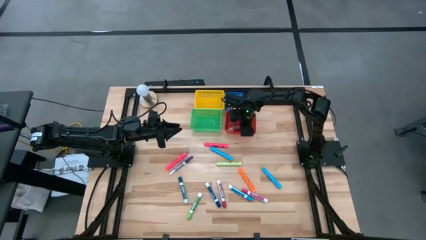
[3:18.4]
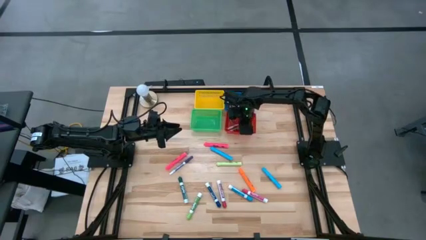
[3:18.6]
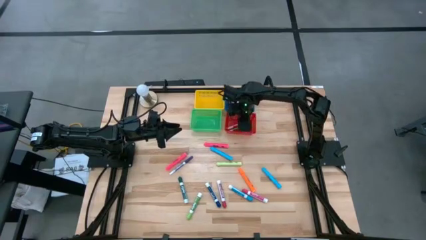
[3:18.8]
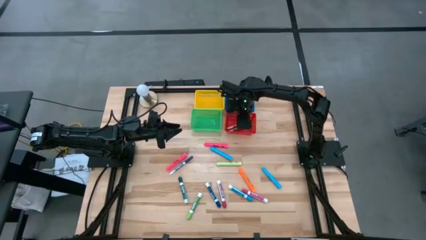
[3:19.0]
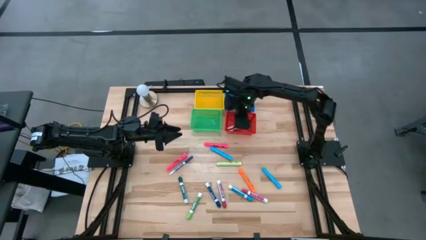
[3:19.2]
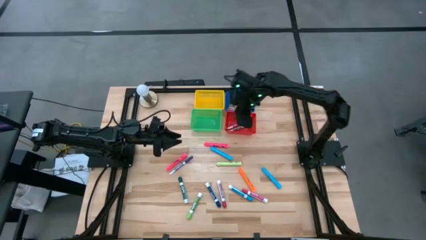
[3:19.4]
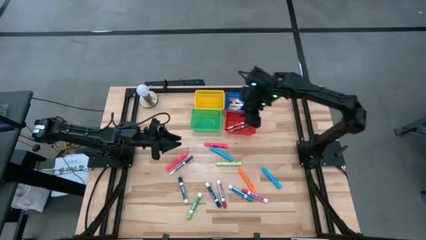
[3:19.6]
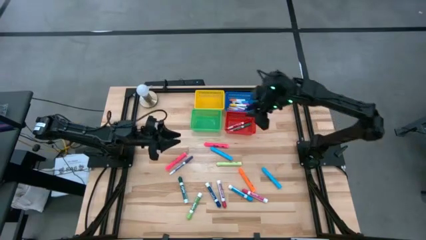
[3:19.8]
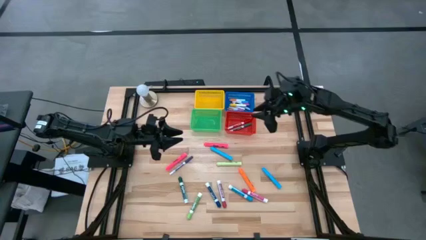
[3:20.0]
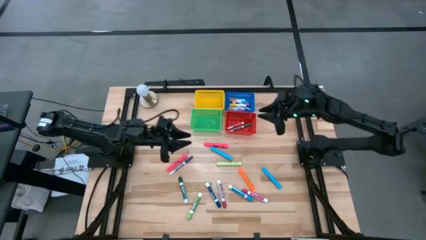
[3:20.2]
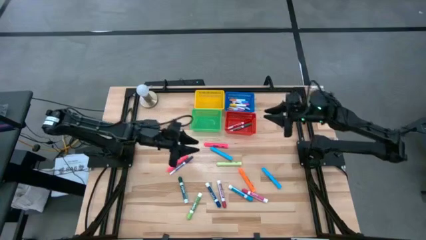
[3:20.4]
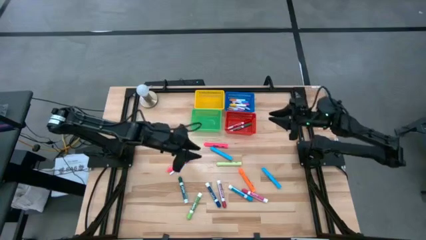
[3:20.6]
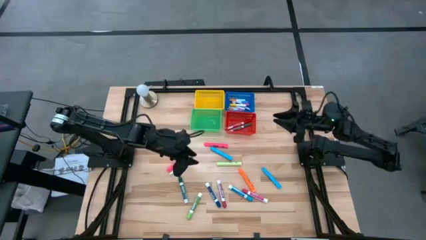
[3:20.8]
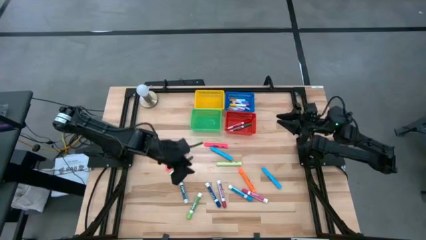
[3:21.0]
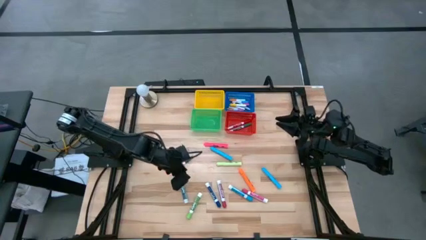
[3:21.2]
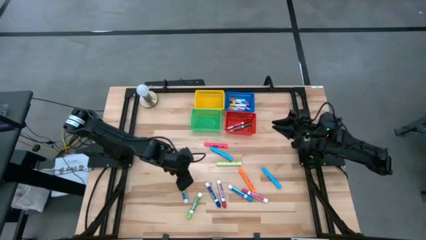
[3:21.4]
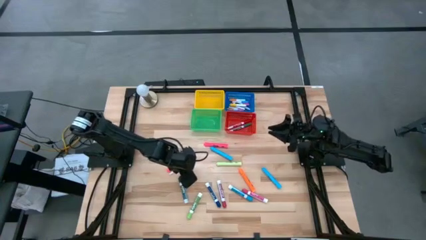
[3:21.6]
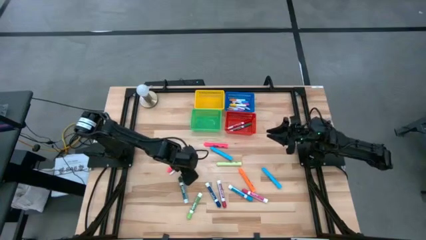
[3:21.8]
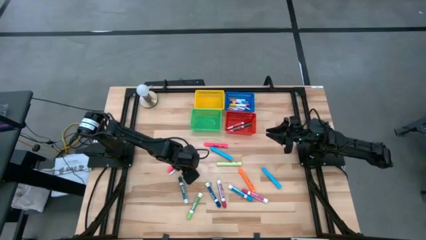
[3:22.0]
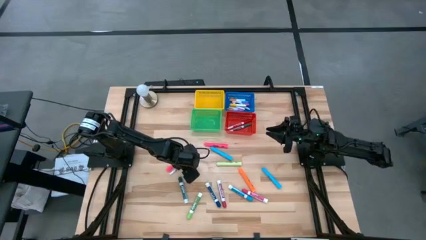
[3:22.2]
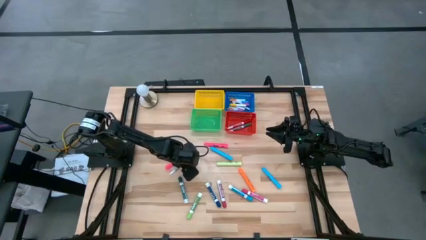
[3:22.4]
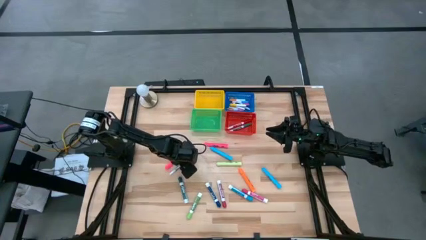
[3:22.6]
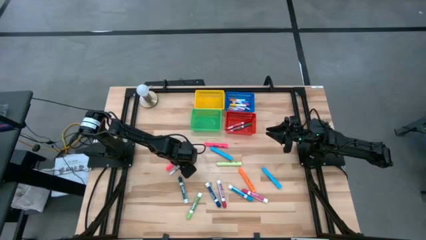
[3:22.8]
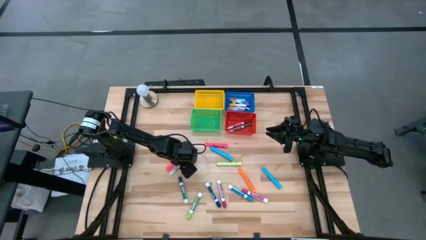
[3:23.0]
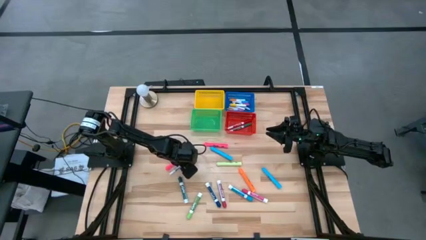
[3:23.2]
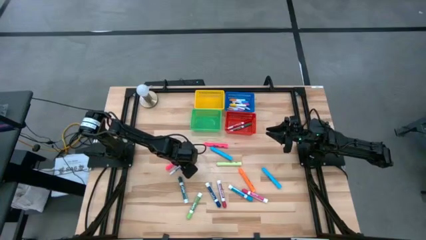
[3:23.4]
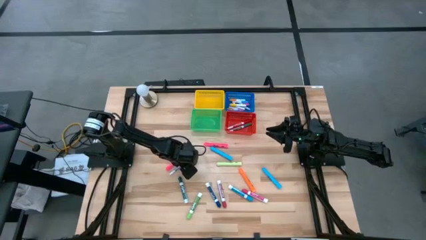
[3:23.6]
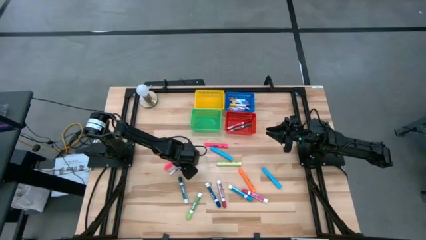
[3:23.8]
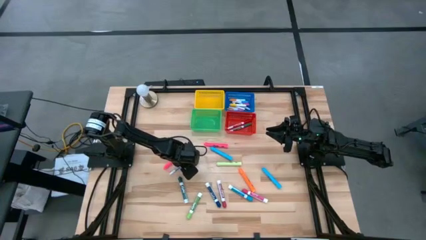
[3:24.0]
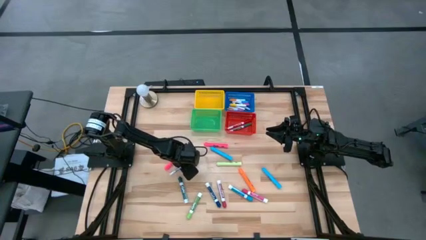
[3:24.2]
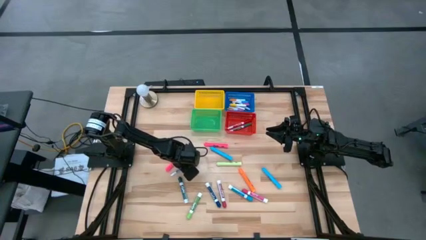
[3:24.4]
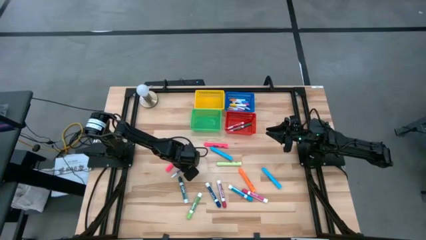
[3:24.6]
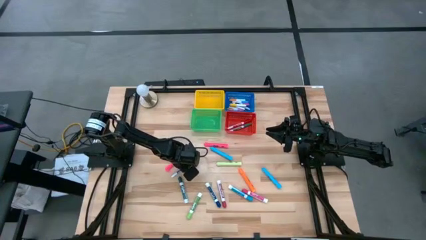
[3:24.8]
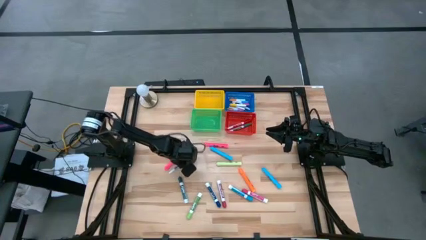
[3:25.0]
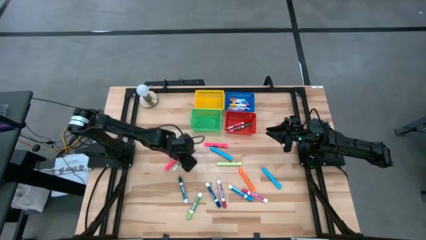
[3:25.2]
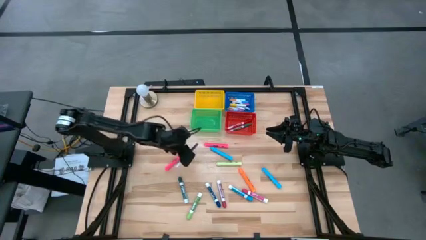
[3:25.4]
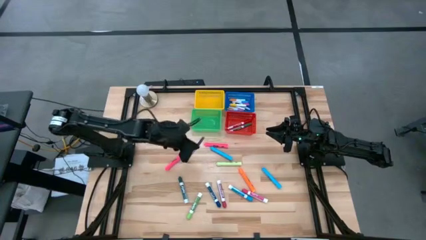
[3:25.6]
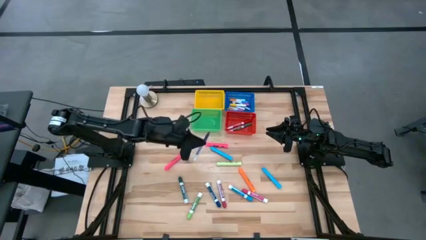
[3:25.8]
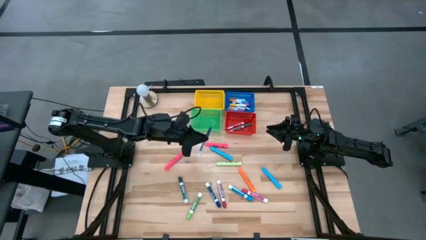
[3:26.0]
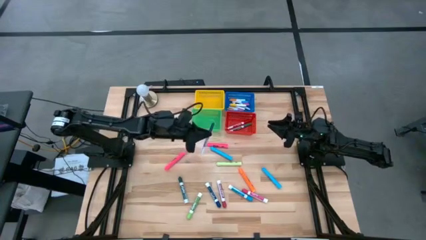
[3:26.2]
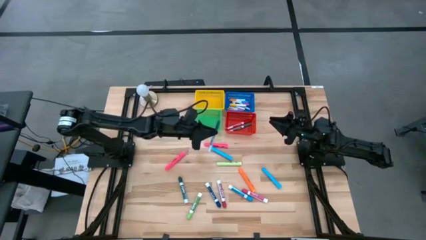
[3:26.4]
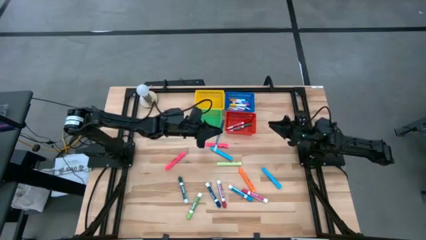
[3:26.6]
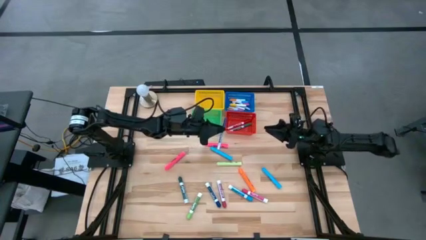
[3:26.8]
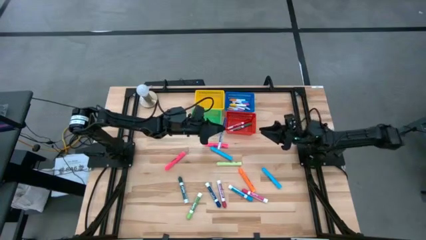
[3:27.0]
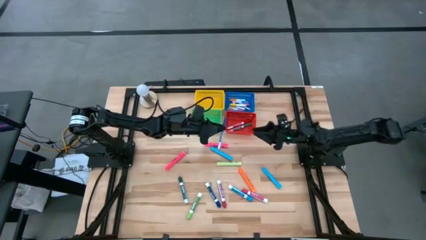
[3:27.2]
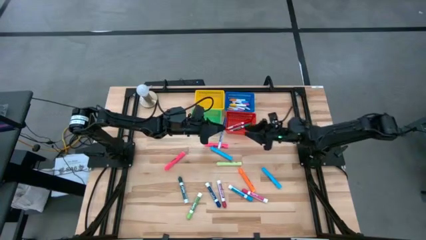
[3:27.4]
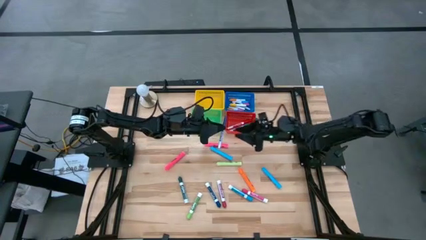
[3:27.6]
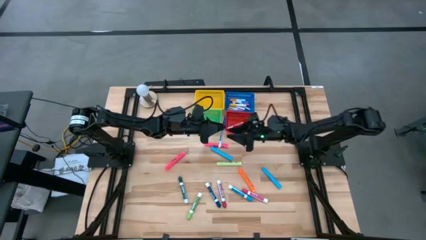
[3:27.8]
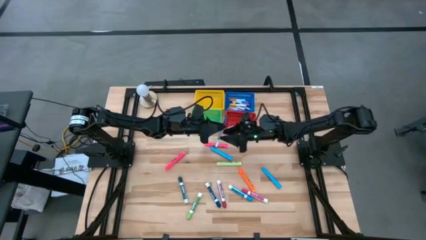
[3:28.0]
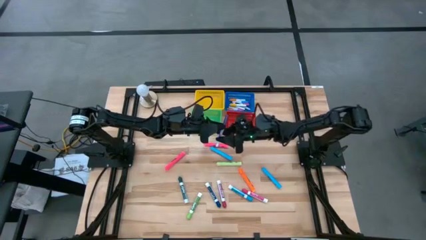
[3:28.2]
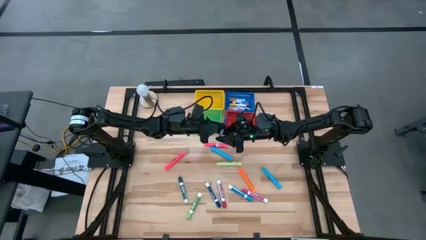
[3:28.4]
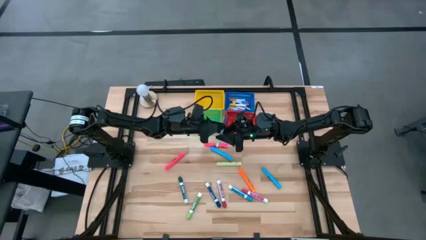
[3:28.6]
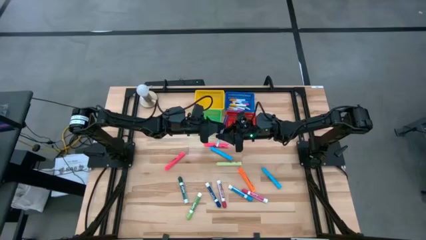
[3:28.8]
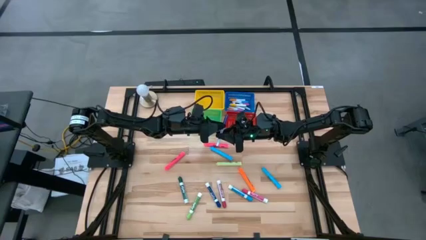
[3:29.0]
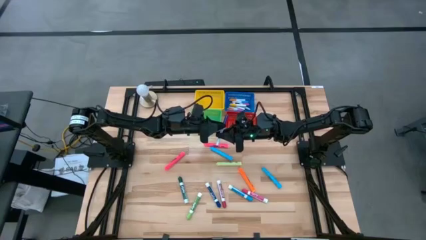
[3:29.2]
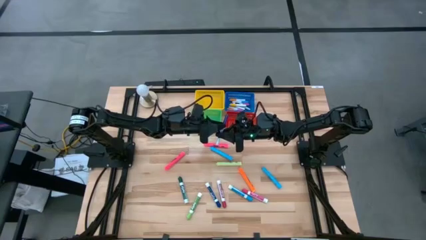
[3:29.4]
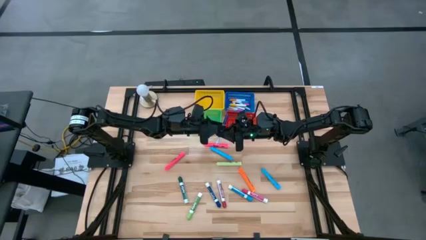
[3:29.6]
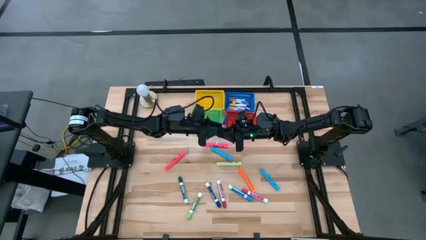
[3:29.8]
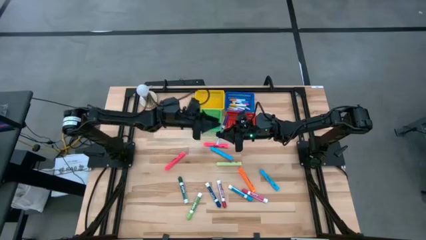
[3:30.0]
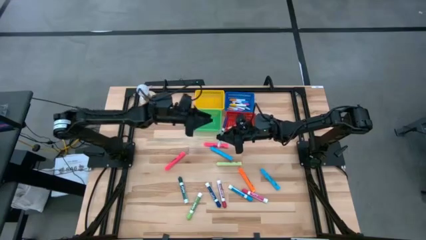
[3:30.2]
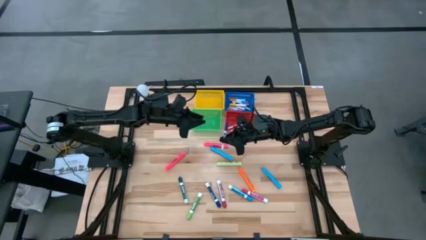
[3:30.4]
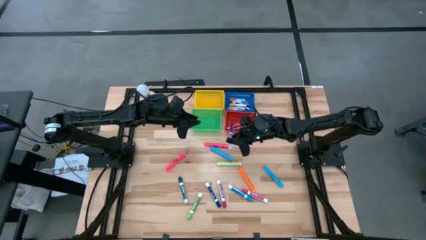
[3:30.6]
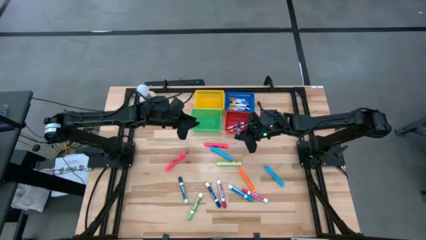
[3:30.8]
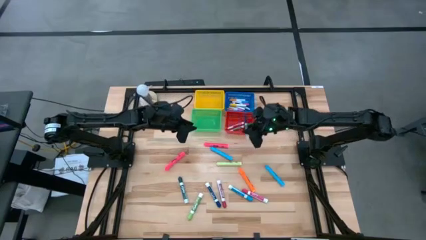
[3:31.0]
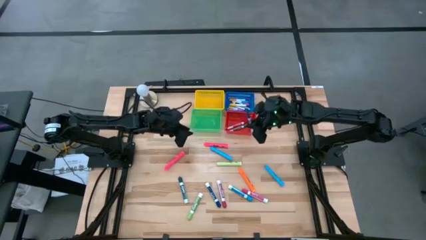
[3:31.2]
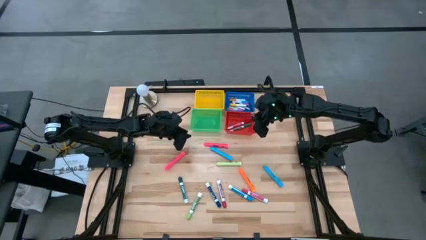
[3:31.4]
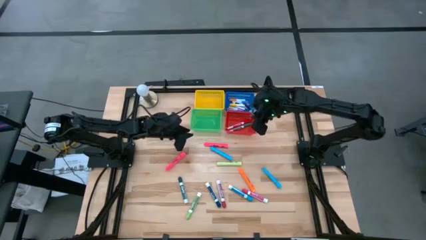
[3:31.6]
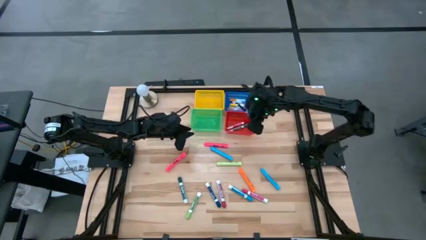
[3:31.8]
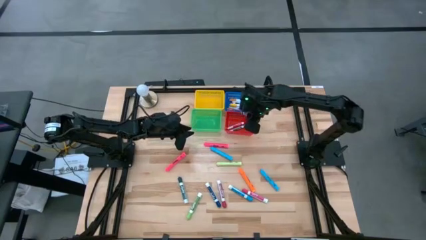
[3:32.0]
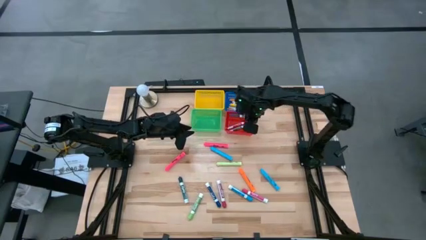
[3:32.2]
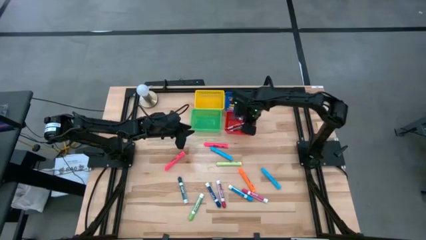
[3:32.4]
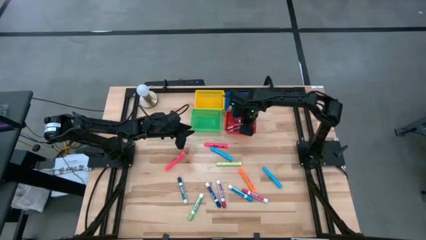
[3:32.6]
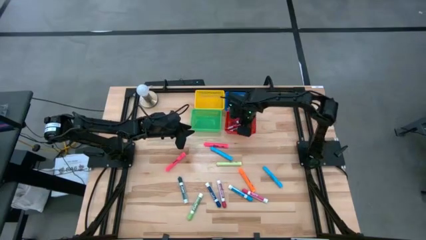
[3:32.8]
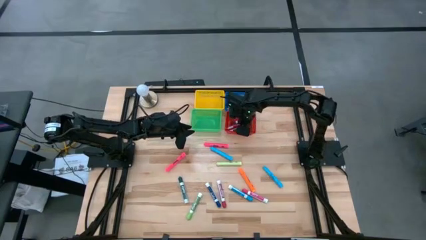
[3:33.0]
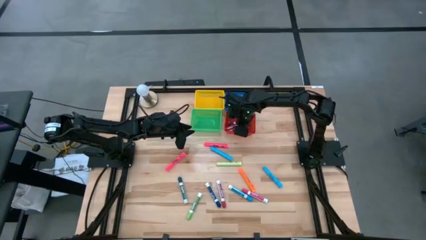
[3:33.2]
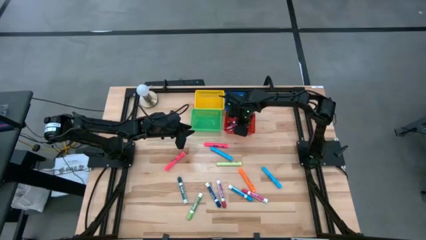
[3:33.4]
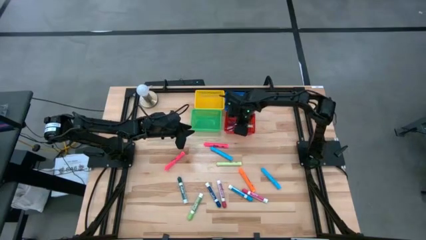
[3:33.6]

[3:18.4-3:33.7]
Task: Pick & Place Markers
Put the small blue marker pen into the red bin
